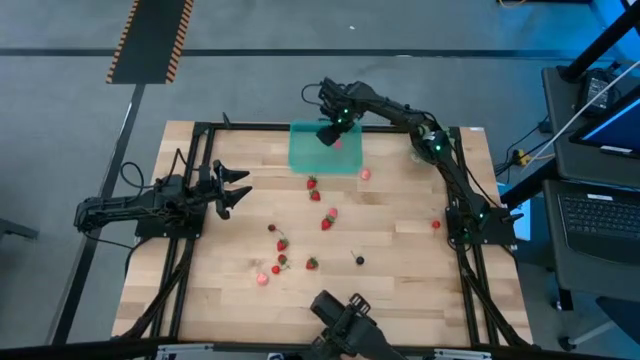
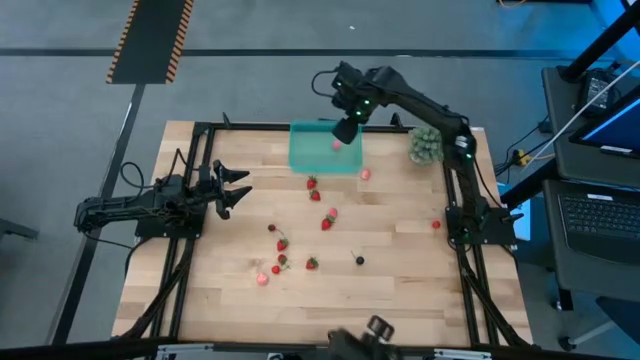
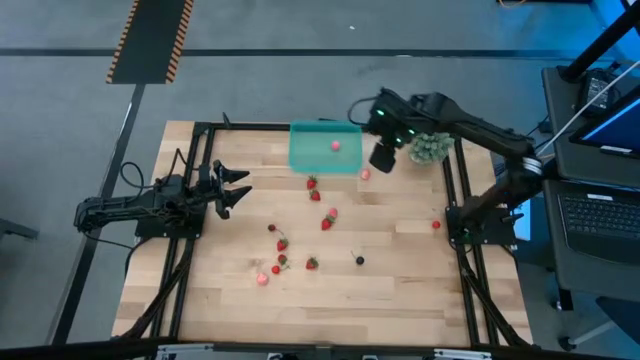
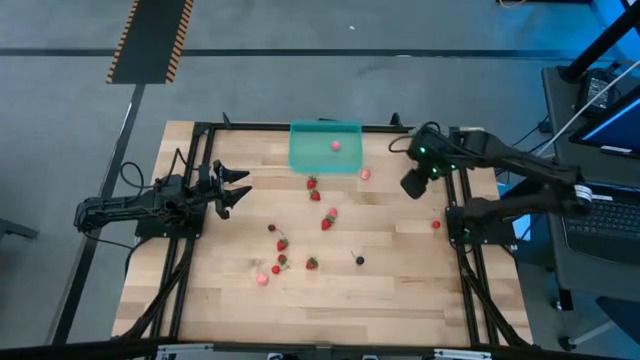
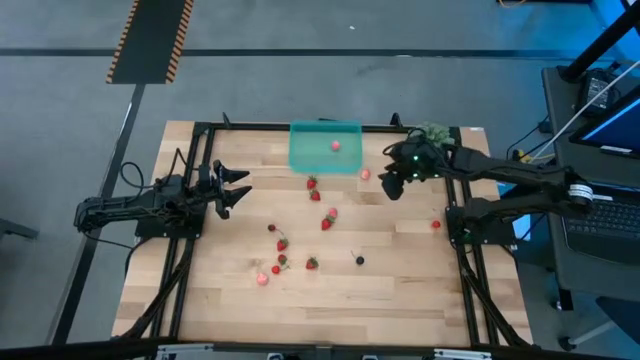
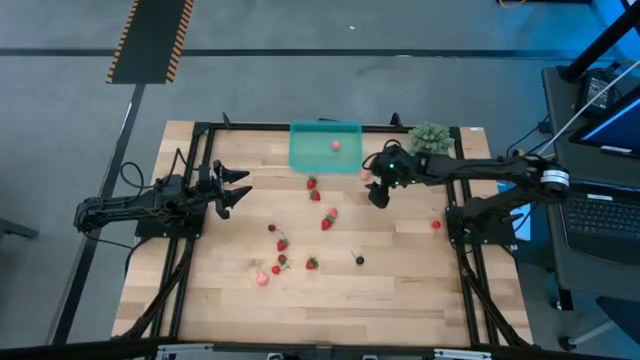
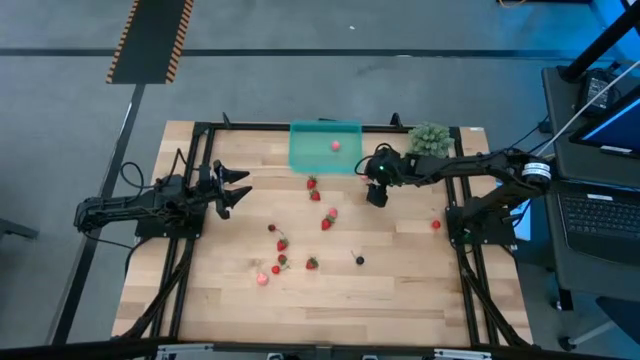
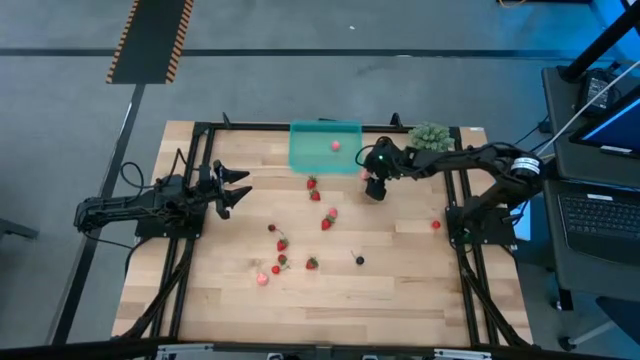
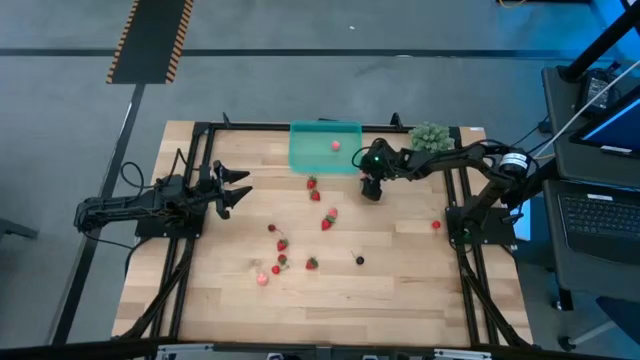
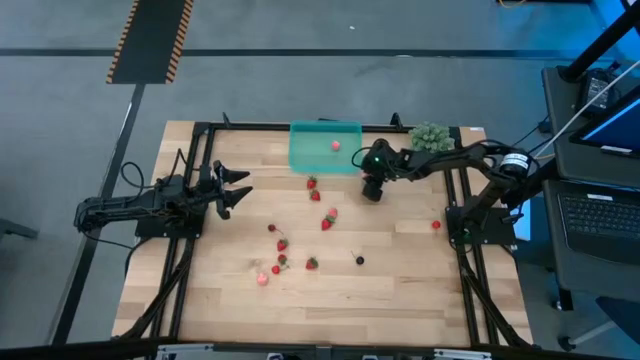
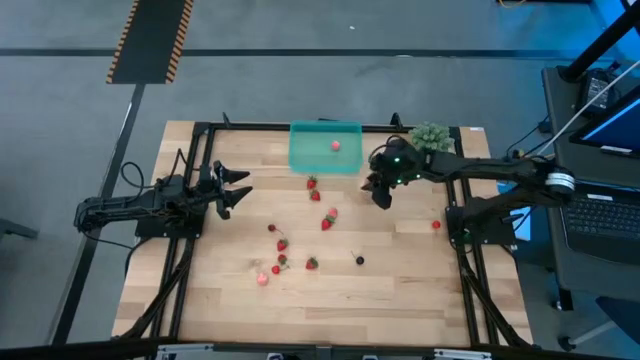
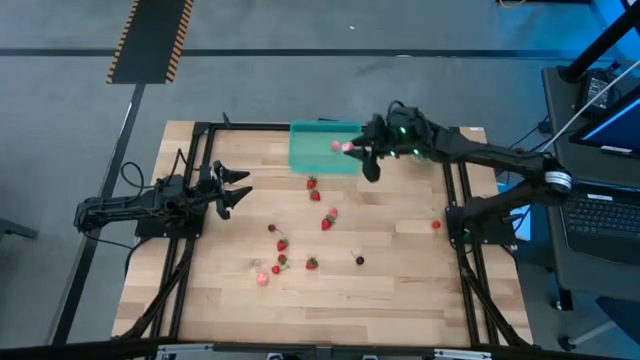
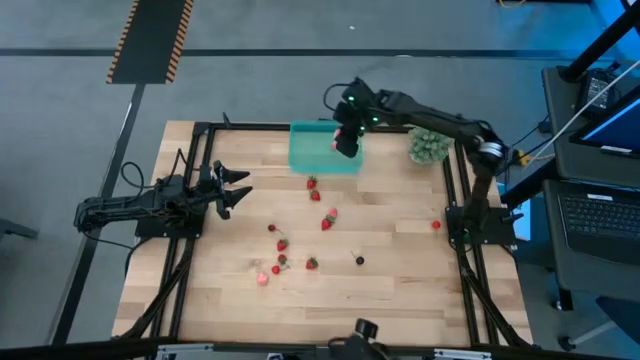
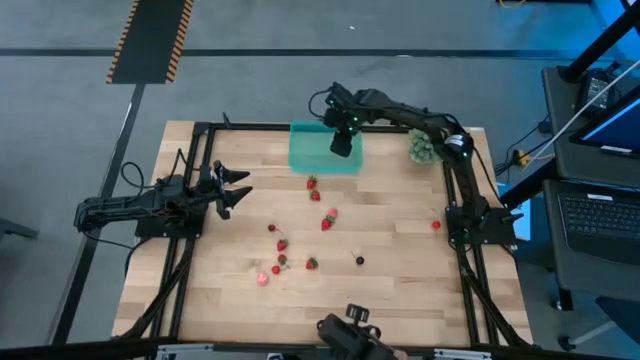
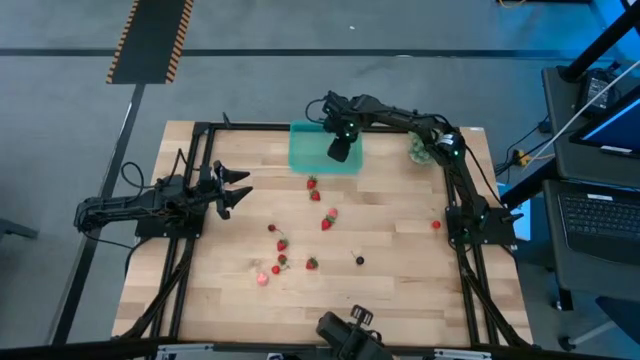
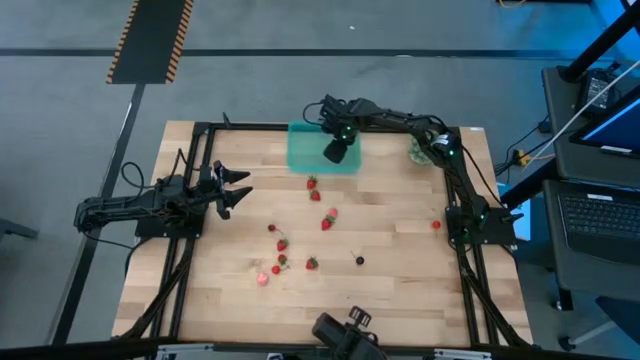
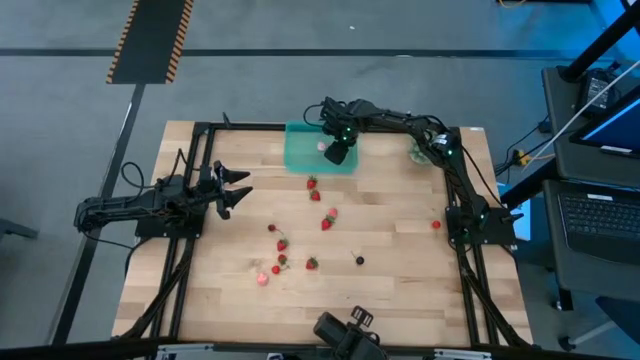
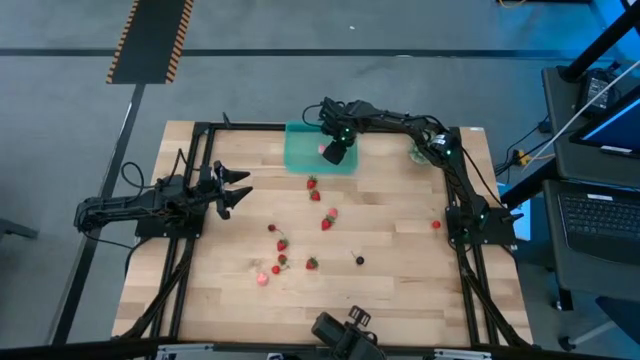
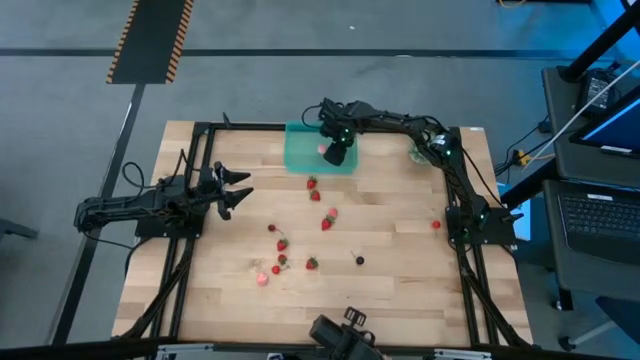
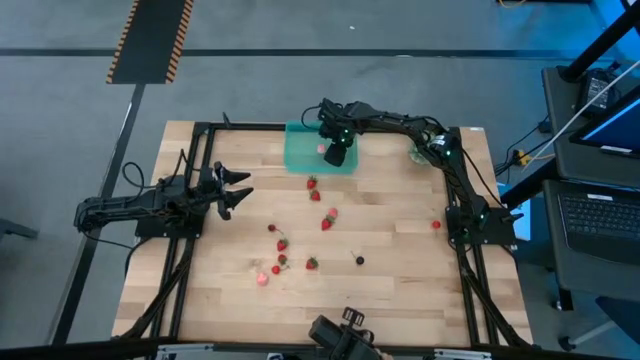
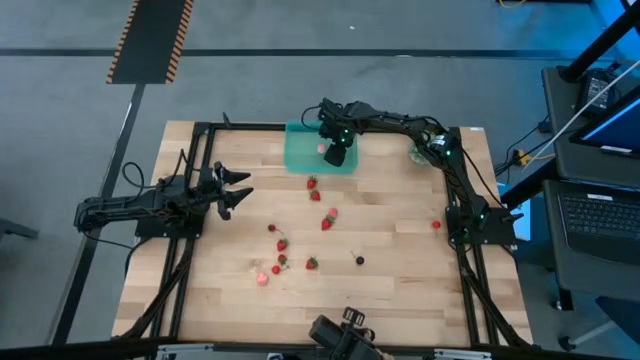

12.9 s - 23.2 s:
Task: Pick and placing Produce into tupperware
Put the pink peach into the green container

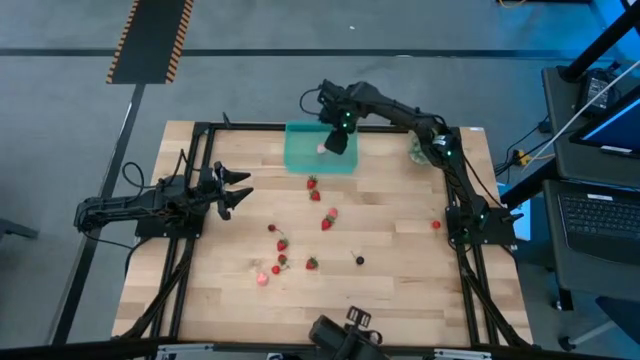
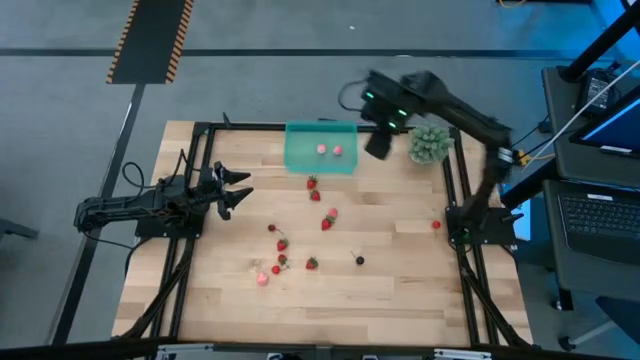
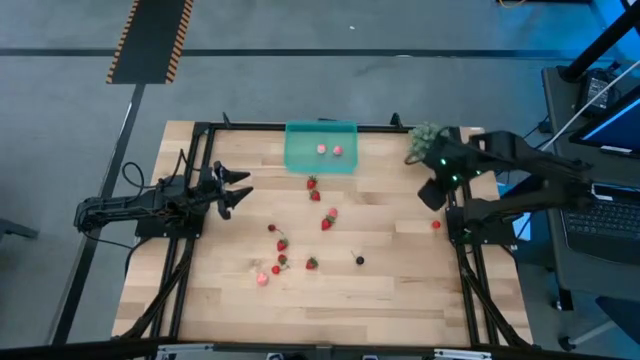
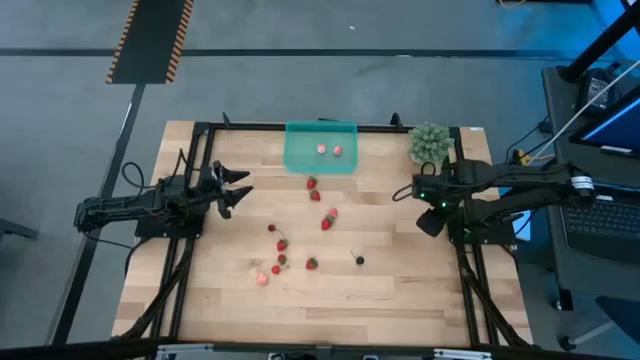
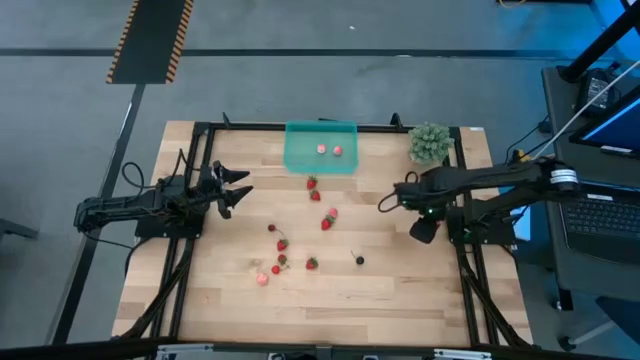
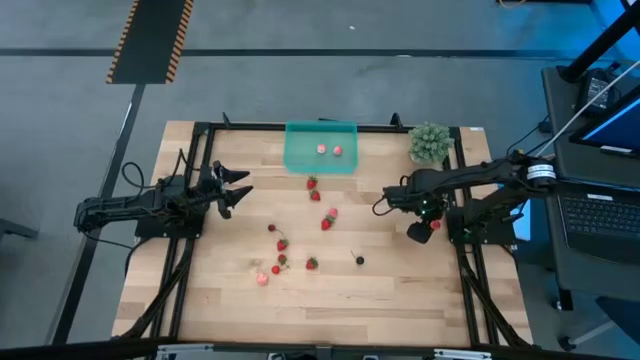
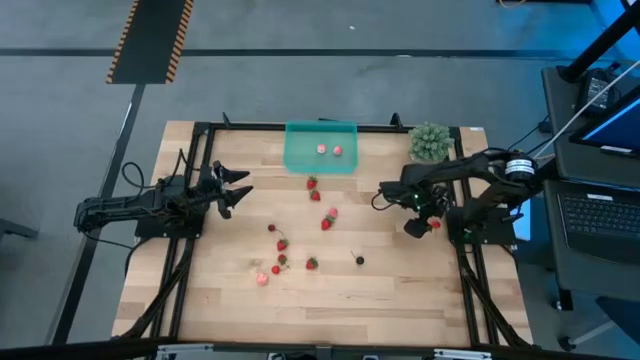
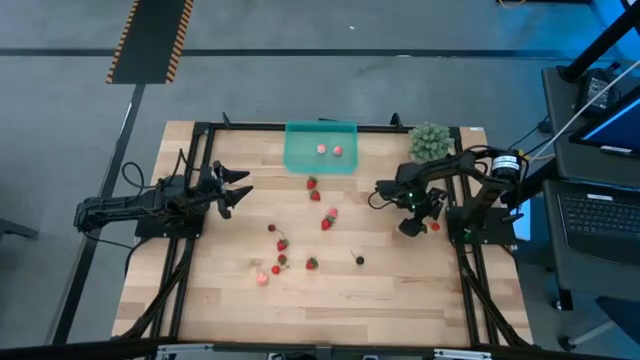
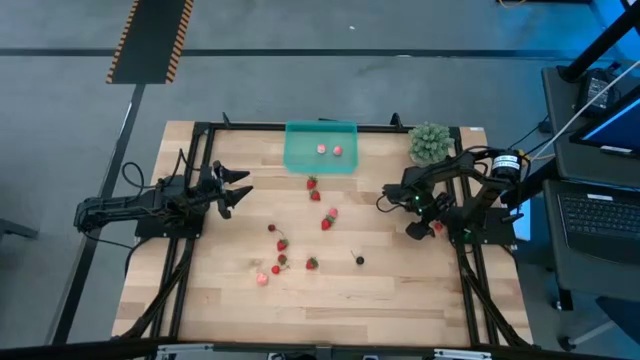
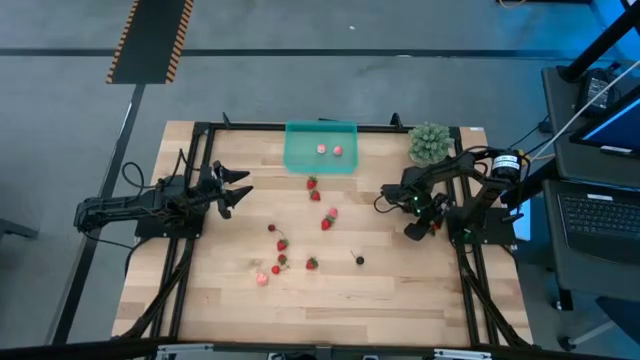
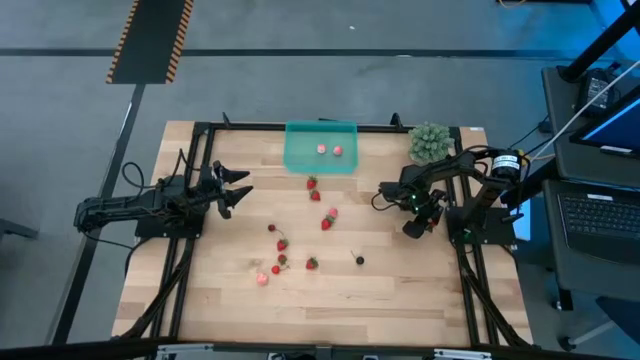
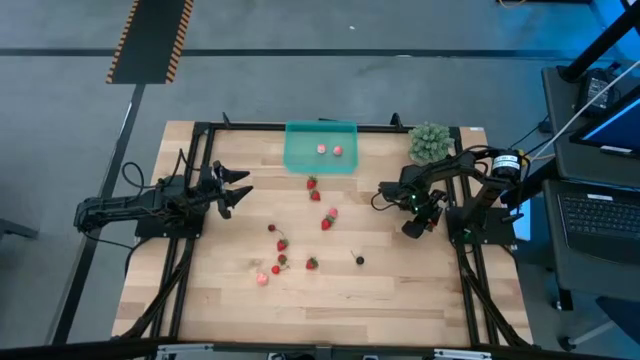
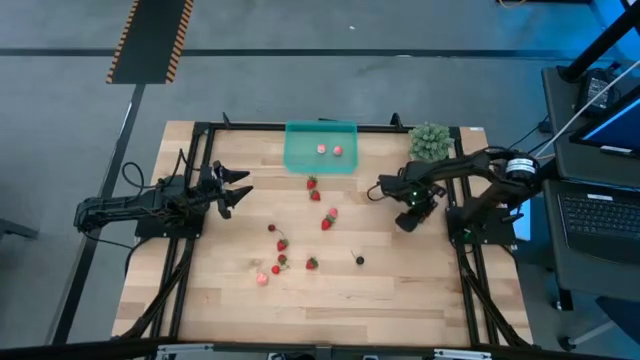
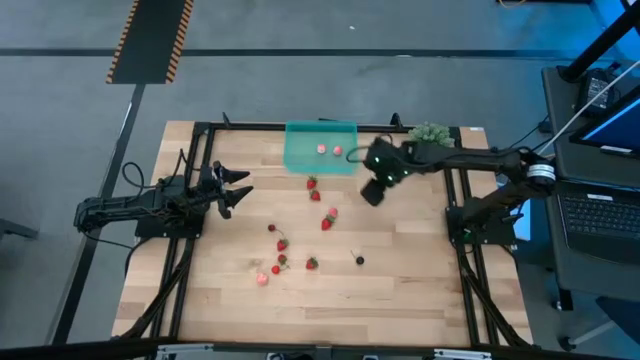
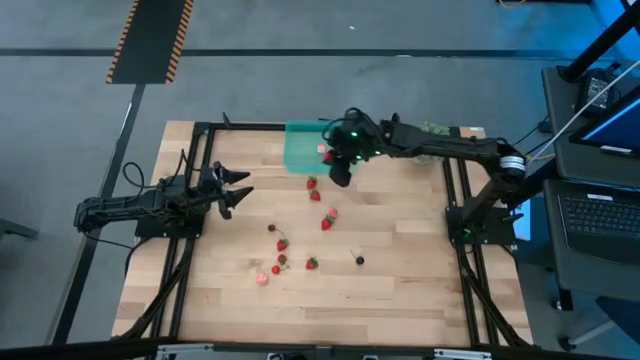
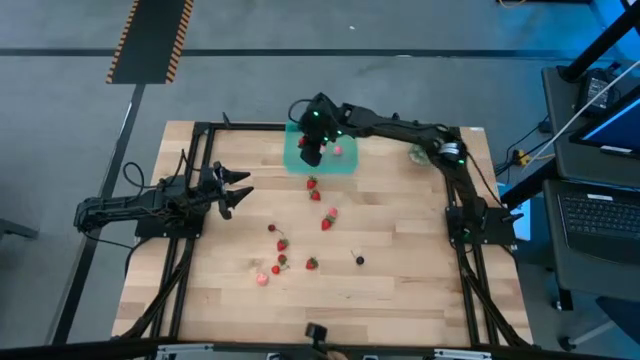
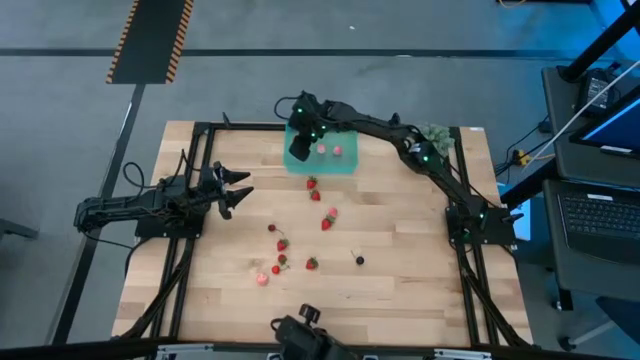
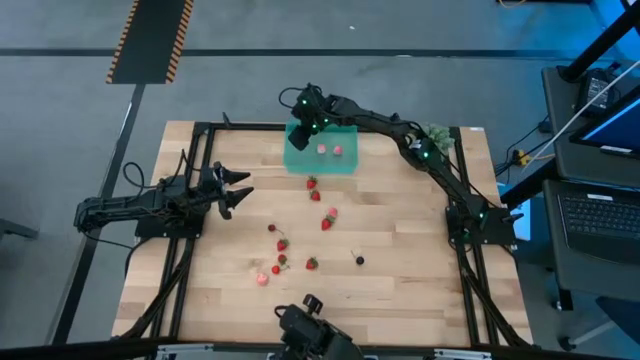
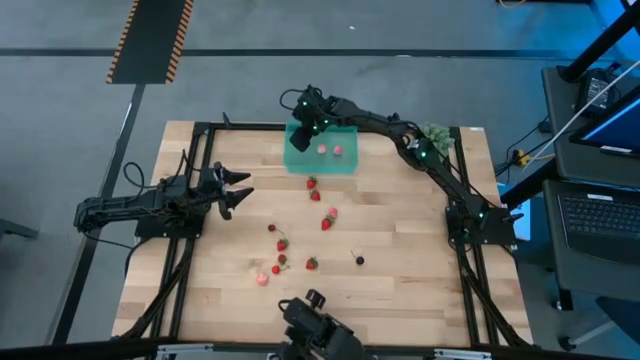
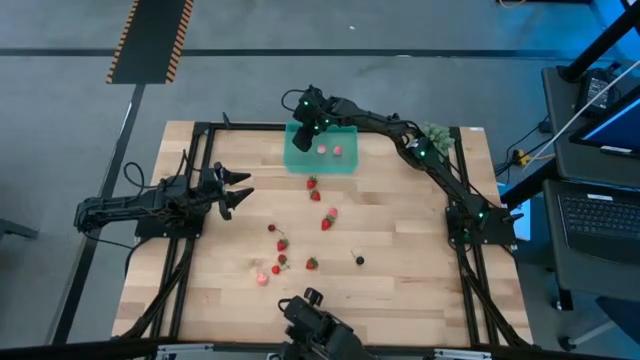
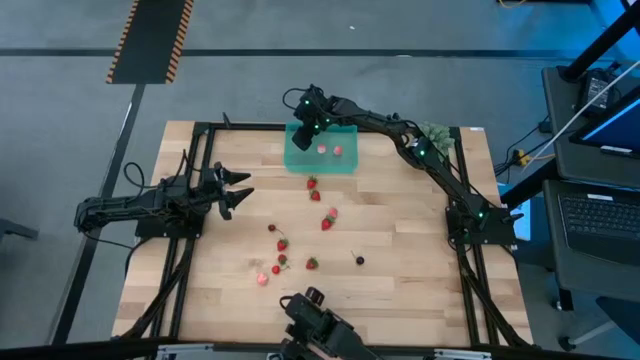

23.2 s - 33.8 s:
Put the red cherry into the green container
